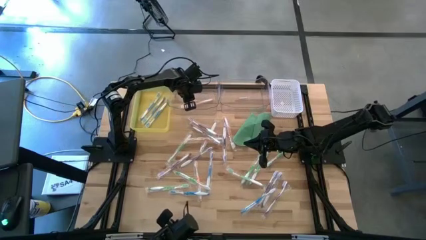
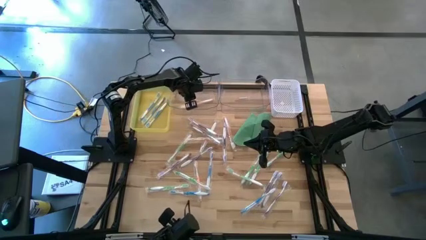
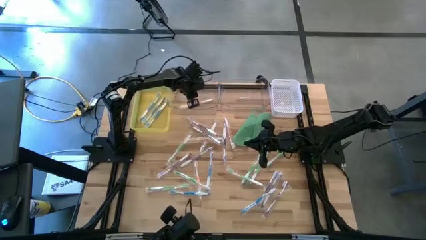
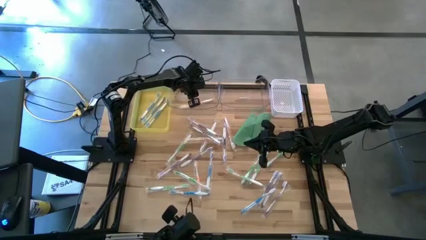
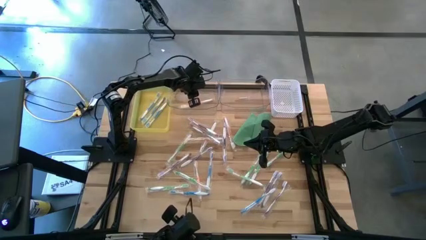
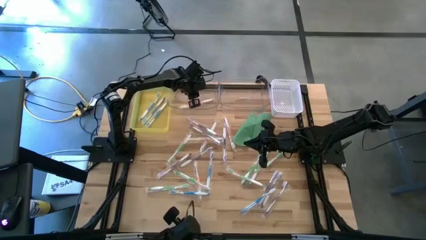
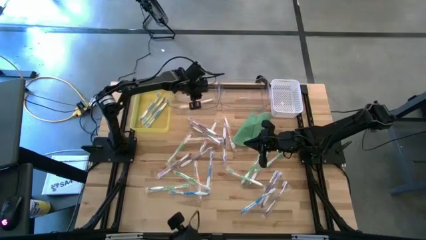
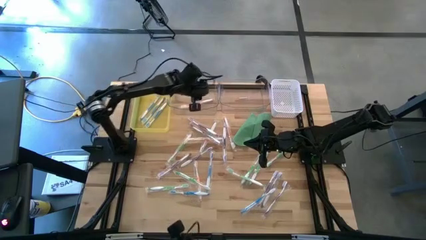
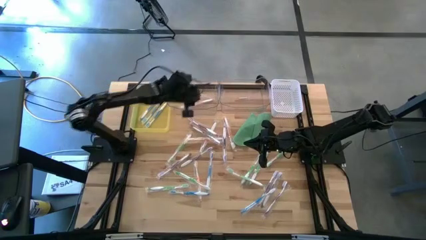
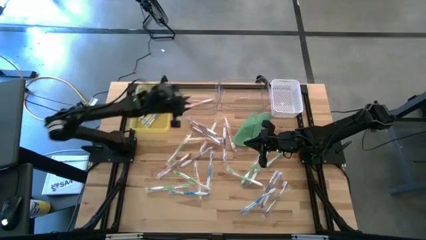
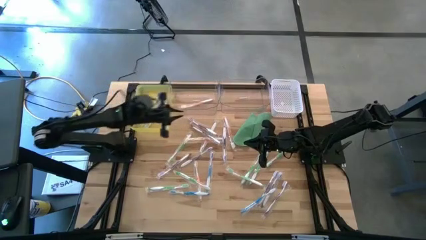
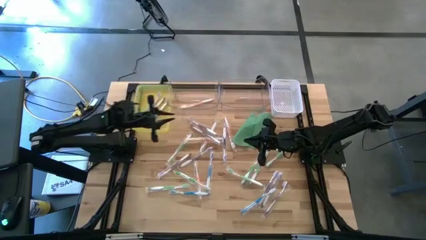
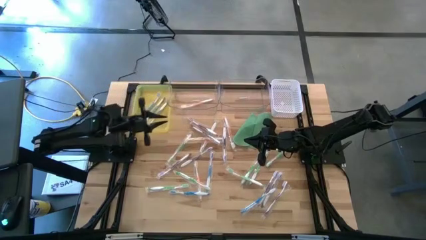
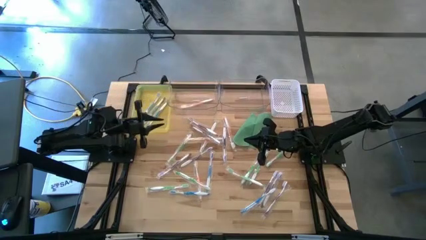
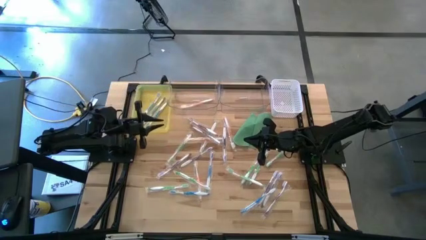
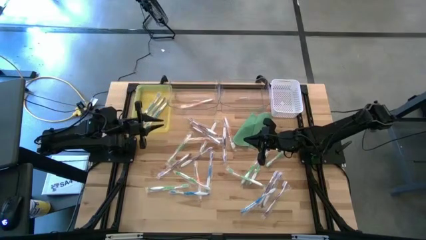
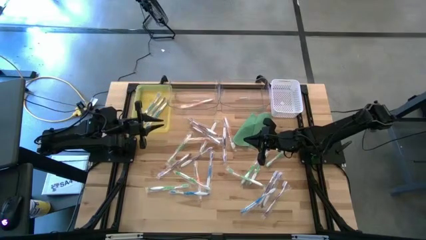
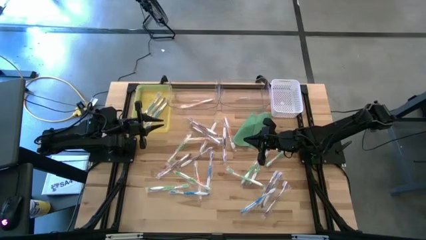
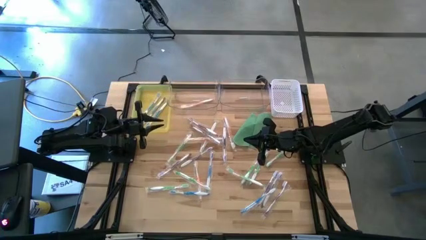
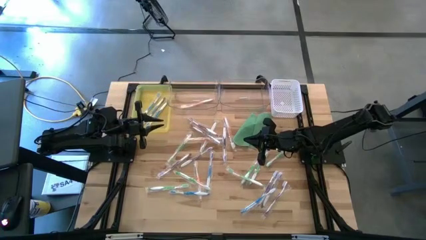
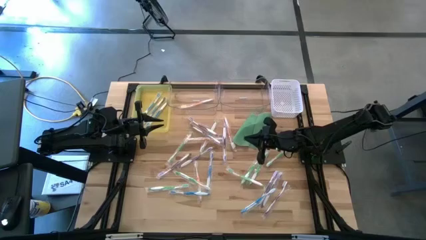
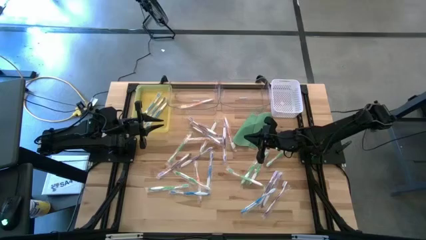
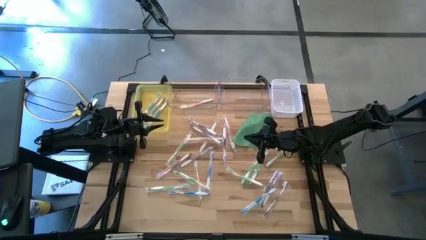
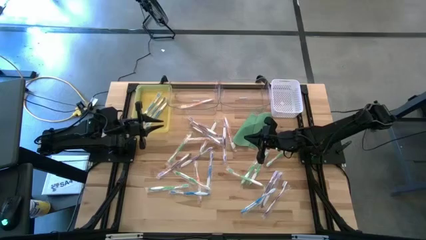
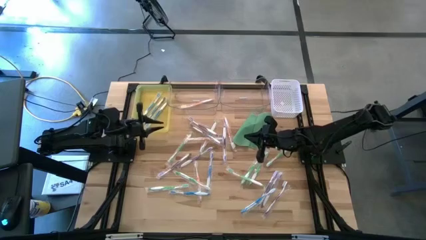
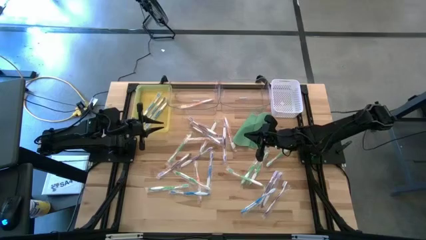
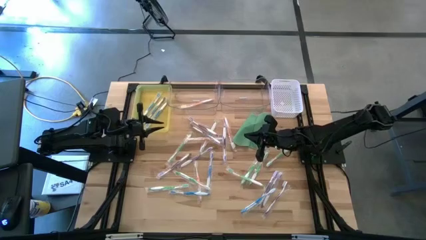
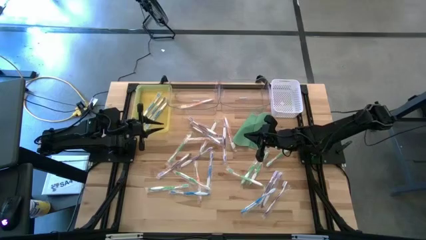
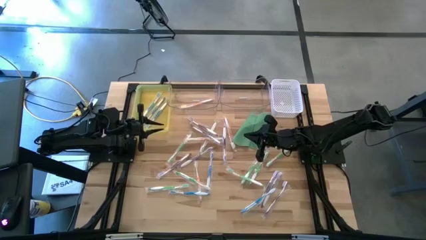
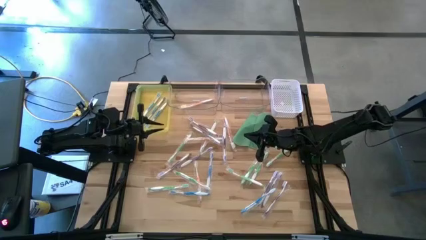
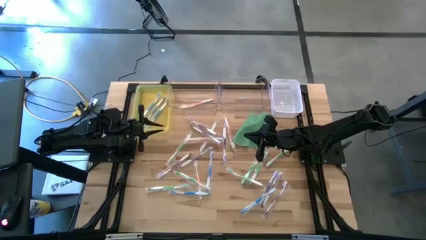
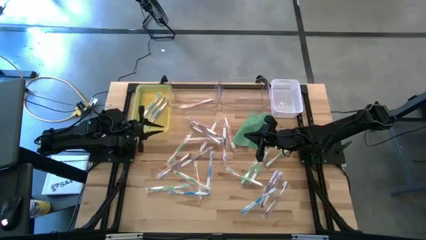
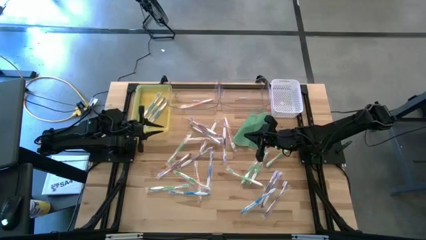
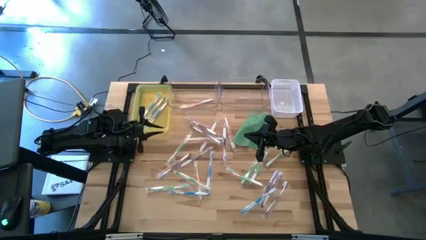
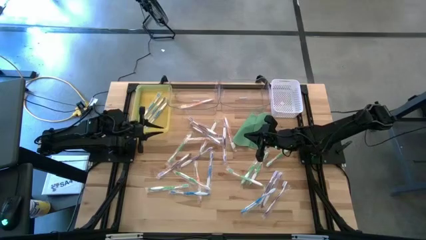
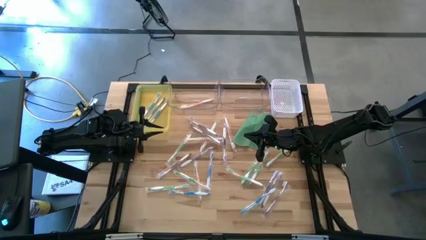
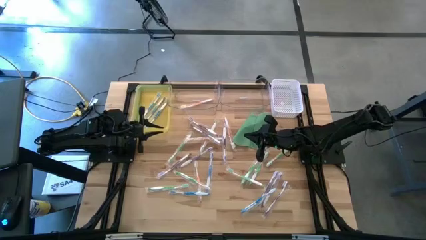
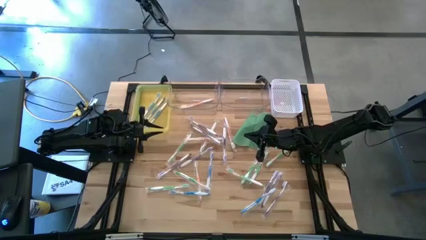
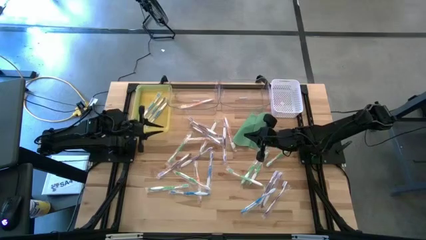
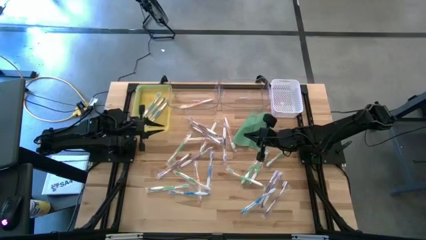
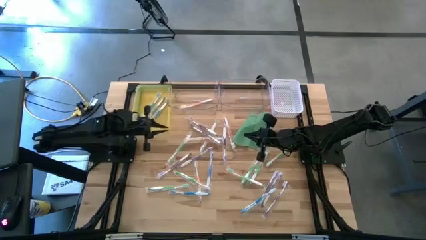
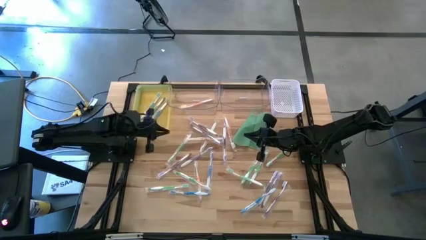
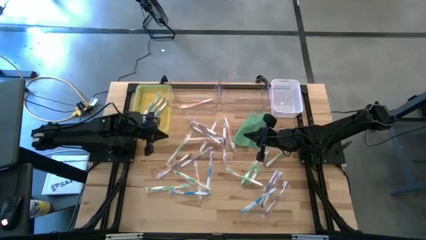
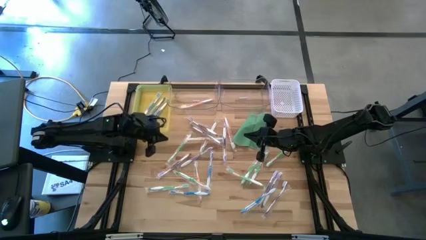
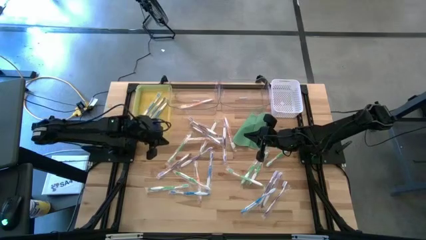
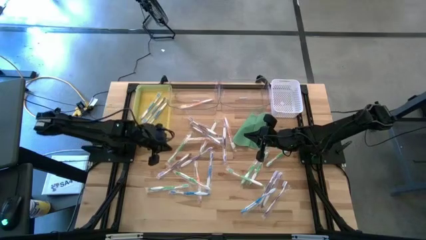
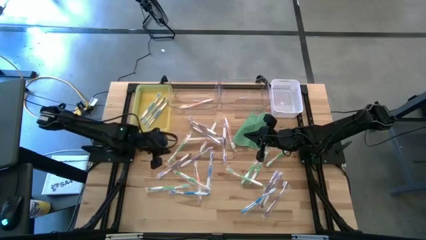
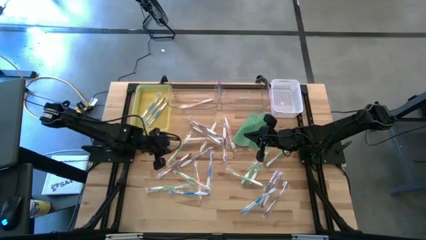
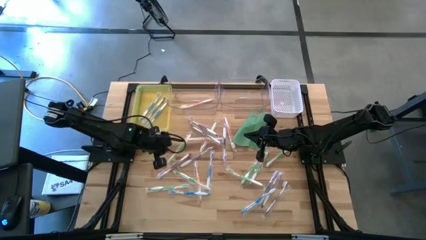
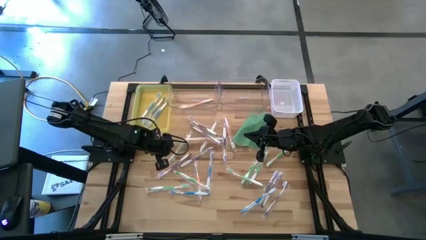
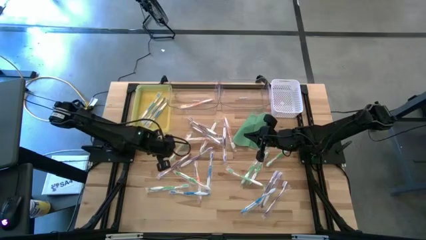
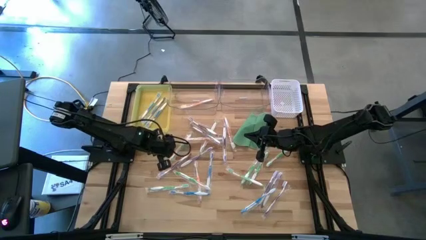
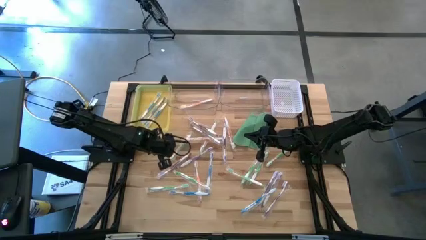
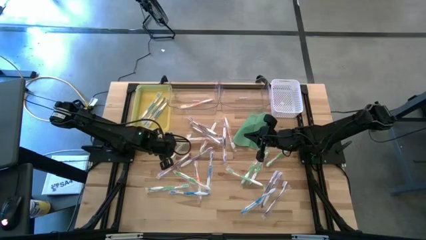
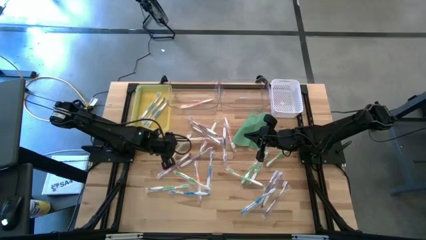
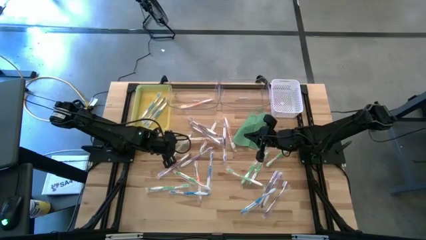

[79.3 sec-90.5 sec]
Task: Pick & Place Toothbrushes
Put the green toothbrush into the right transparent bin
